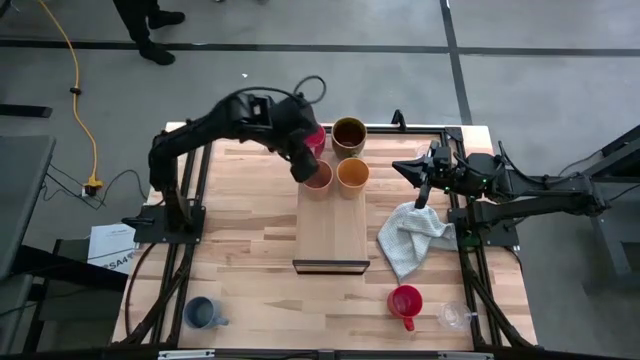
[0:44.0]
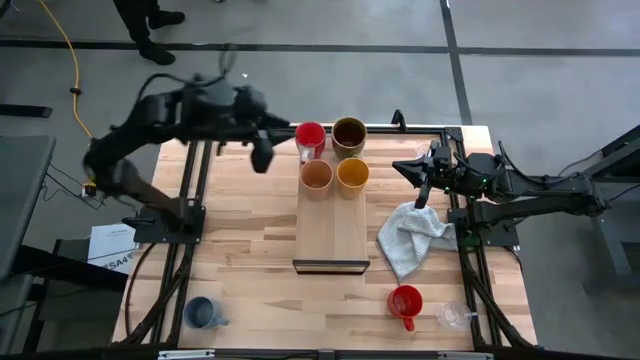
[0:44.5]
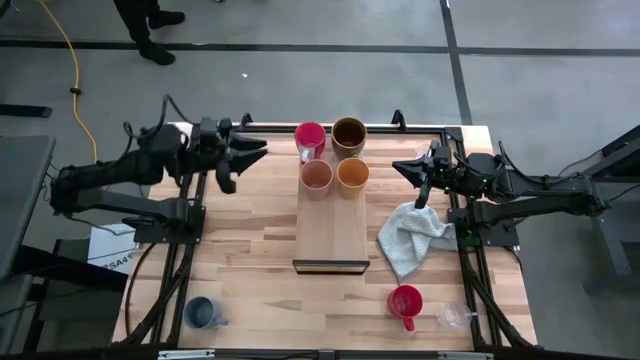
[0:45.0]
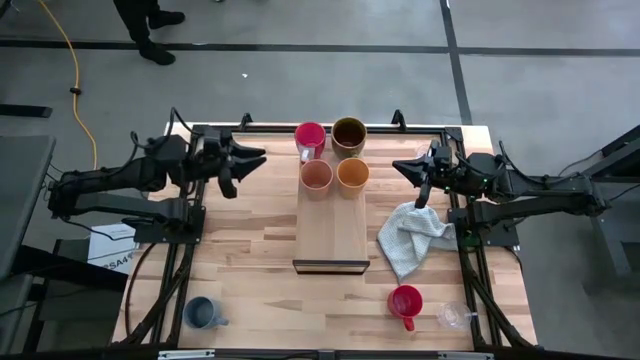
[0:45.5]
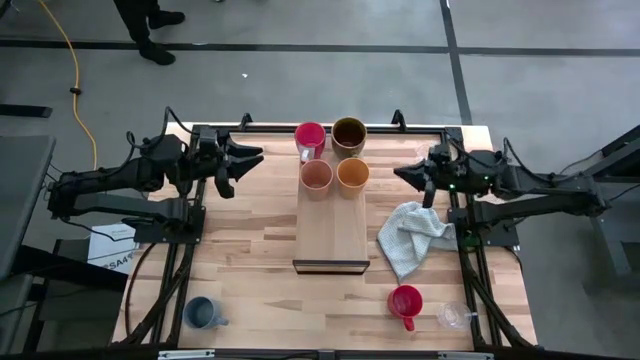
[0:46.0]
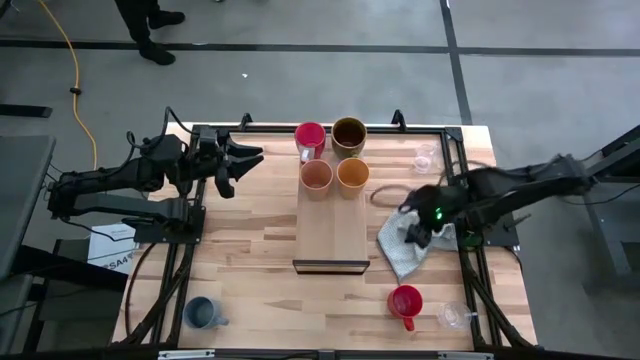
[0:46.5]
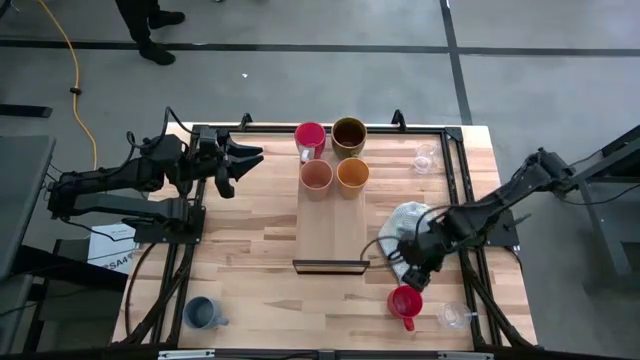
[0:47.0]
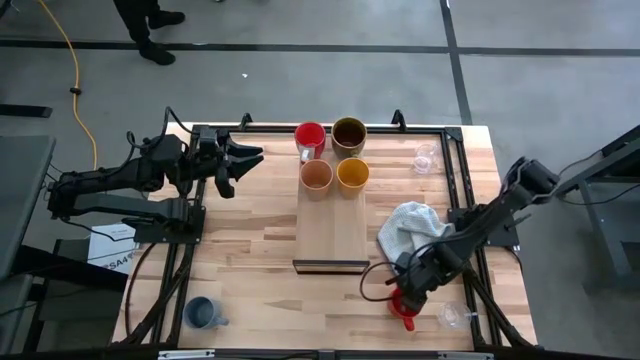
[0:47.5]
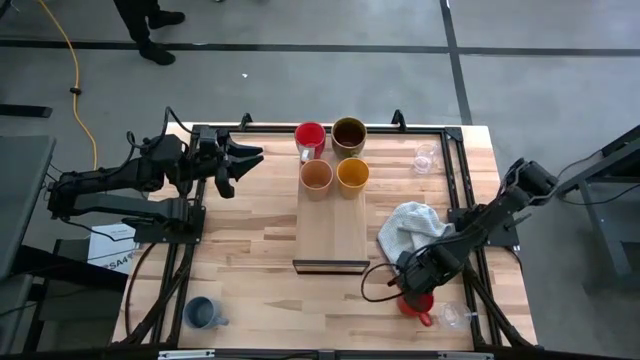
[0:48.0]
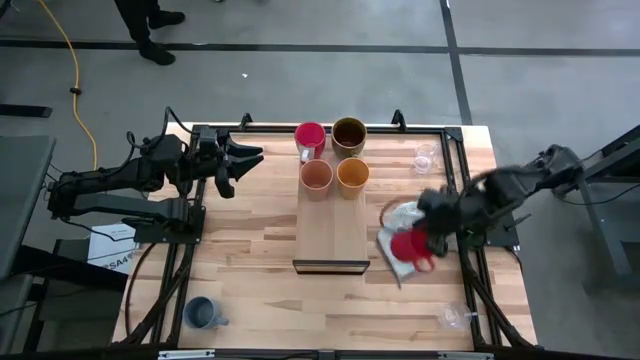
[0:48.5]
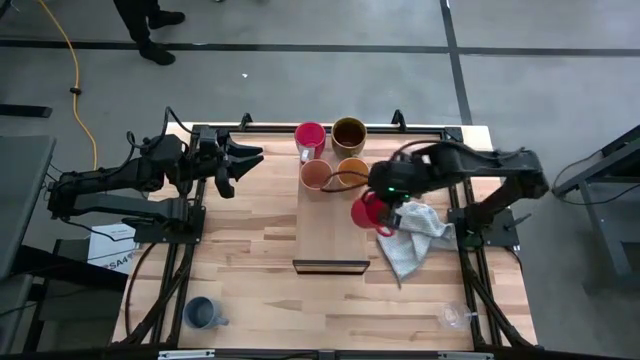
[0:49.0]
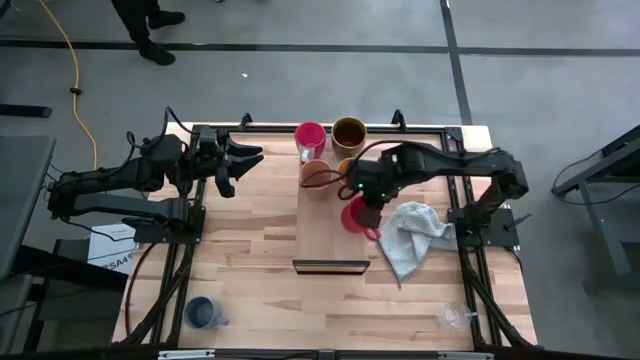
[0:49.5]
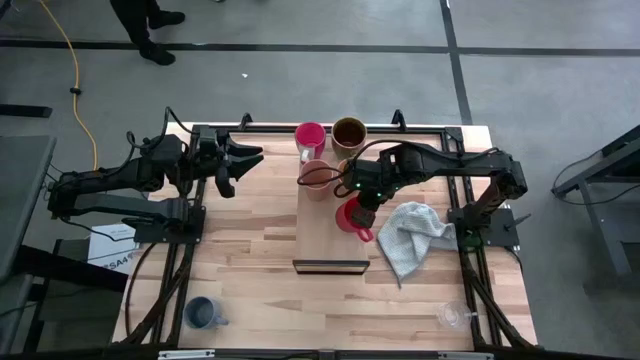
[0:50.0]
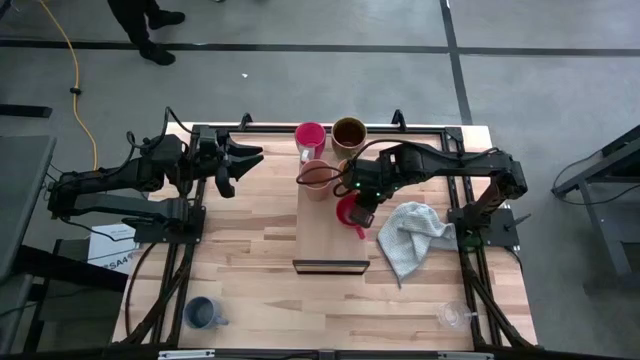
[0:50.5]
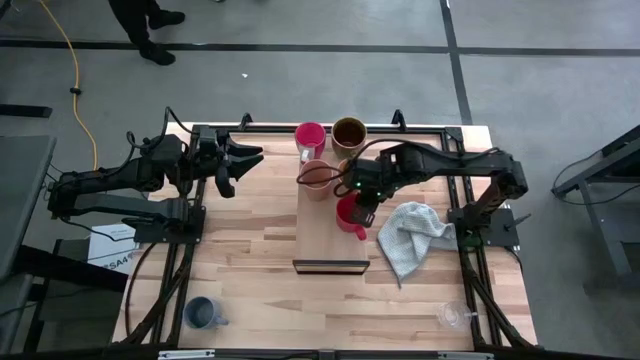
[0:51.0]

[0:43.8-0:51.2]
Task: Stack small to large cups/mugs on shelf
Put the red mug on the shelf

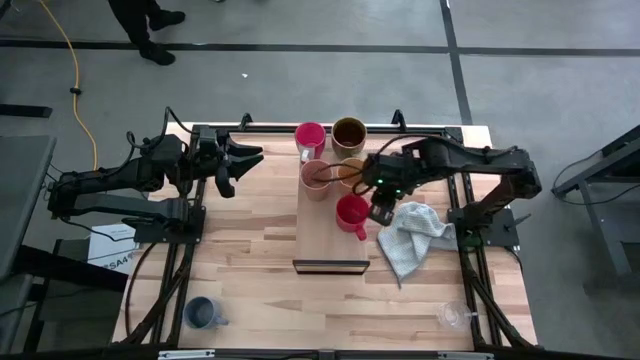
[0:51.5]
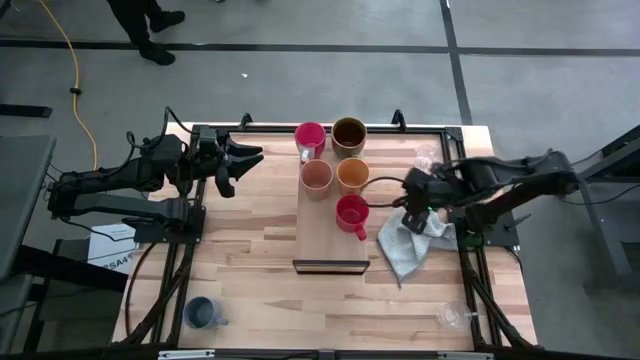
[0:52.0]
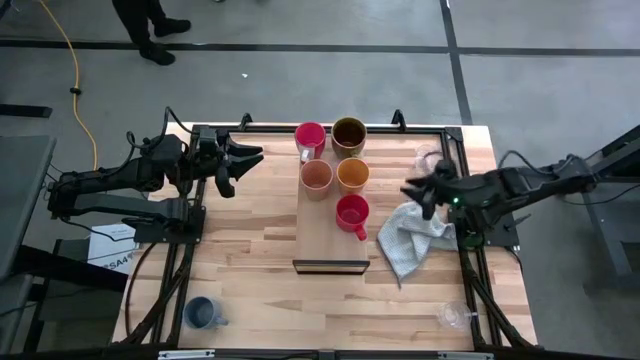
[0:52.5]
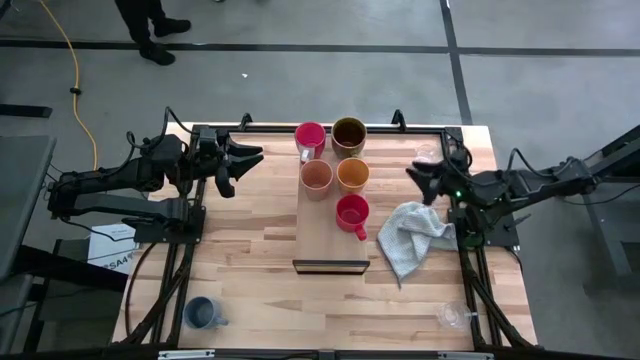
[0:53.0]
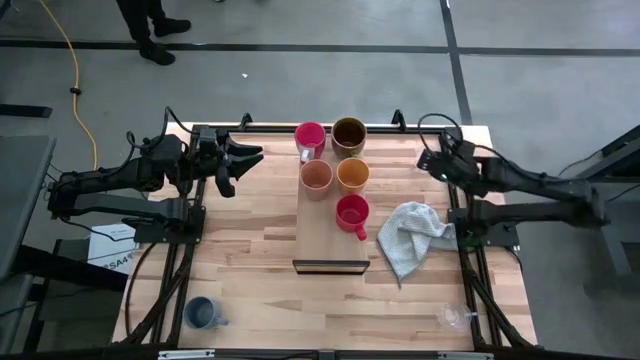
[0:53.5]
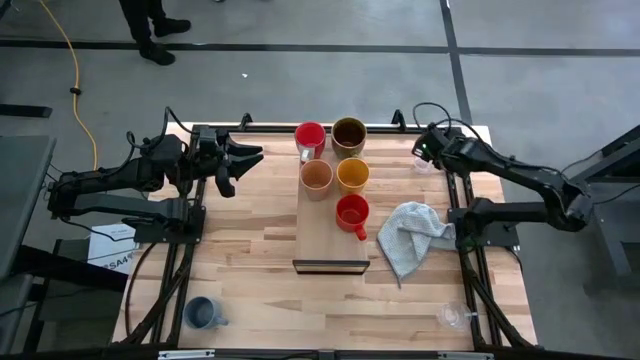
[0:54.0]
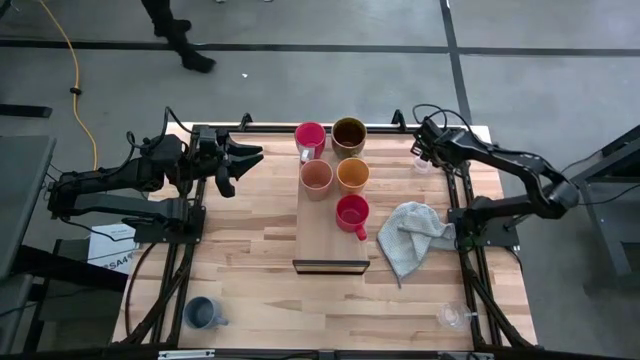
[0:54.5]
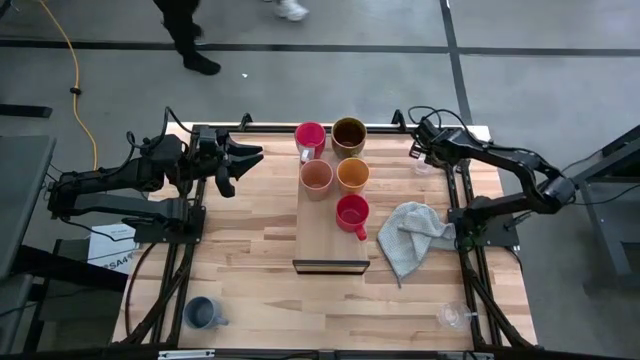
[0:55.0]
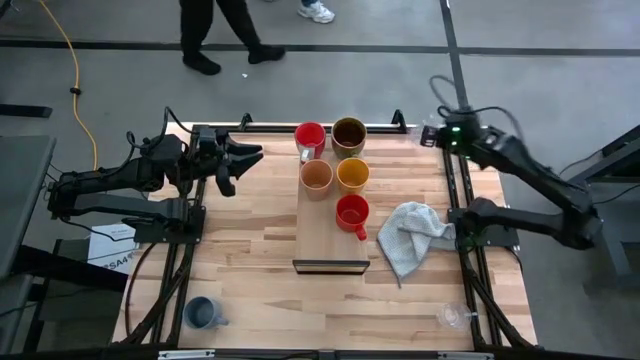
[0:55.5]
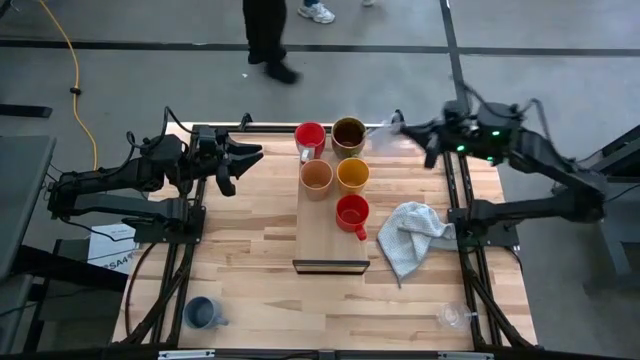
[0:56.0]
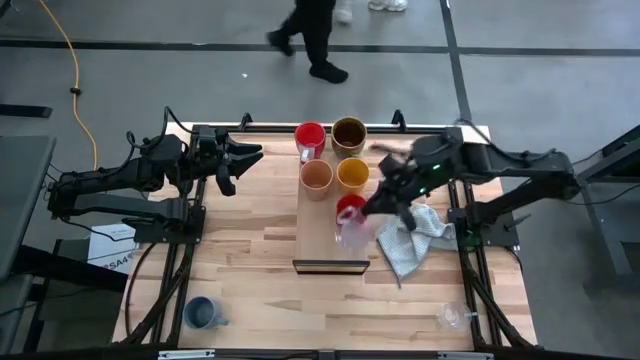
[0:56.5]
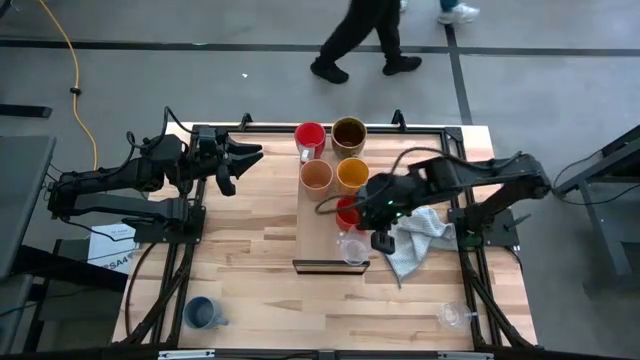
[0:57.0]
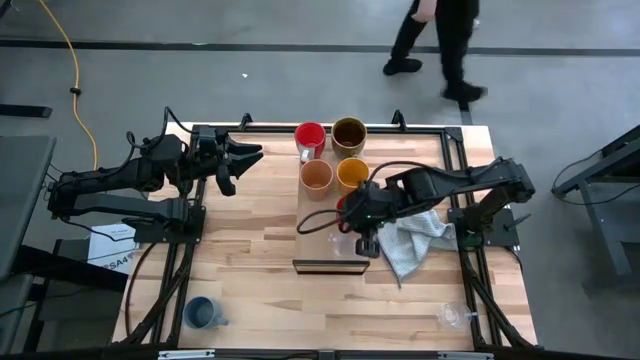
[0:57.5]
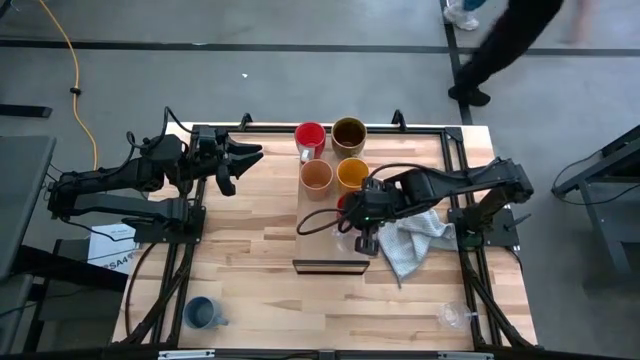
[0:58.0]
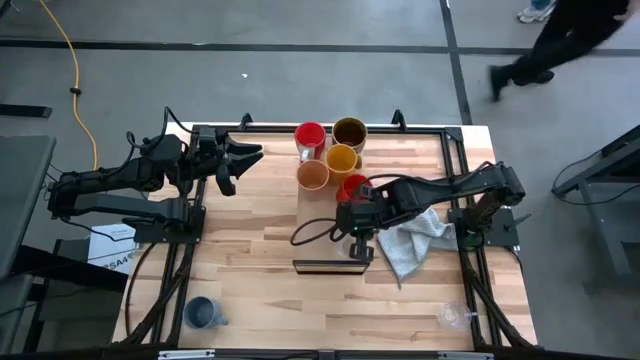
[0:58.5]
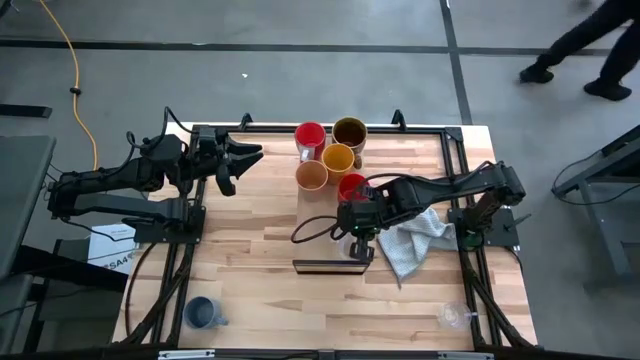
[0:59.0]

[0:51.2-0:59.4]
Put the top transparent mug on the shelf

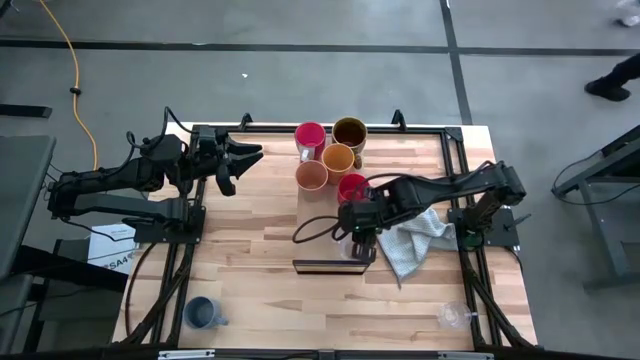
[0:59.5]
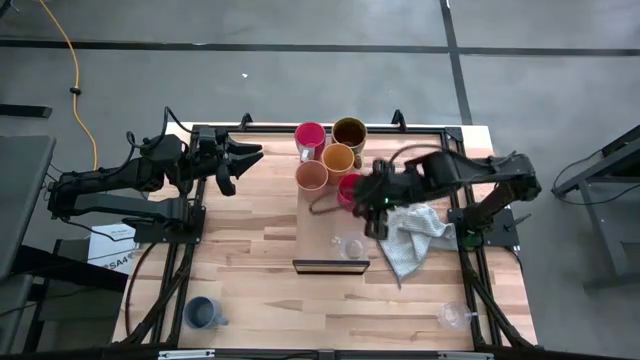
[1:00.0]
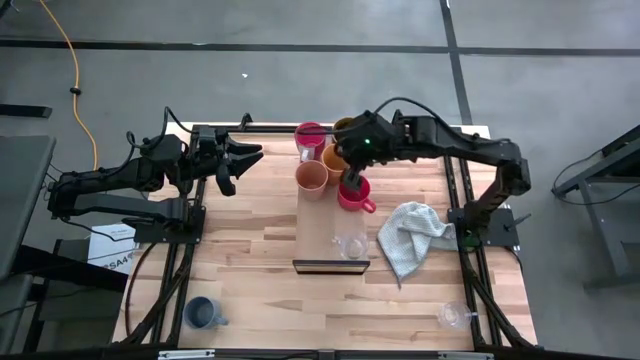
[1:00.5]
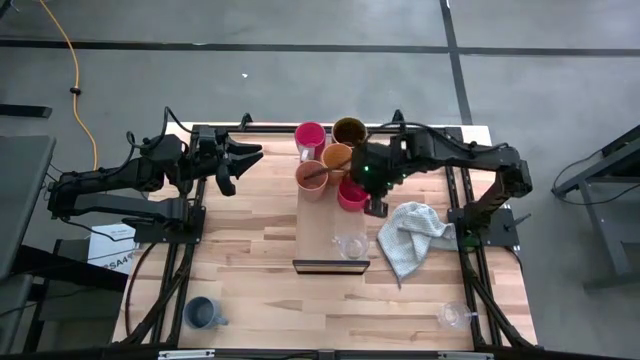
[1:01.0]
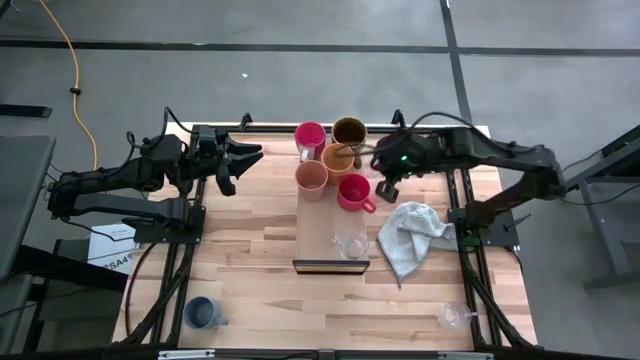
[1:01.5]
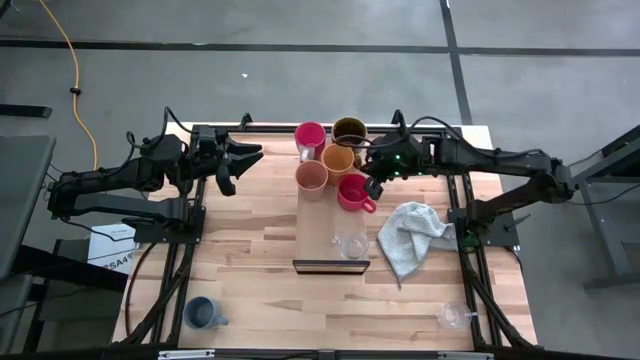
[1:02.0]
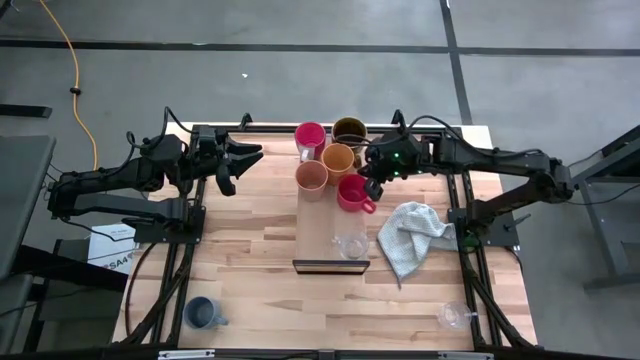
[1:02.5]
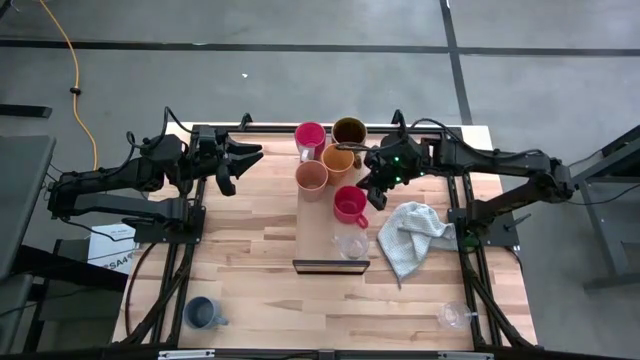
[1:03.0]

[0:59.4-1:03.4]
Adjust the red mug on the shelf

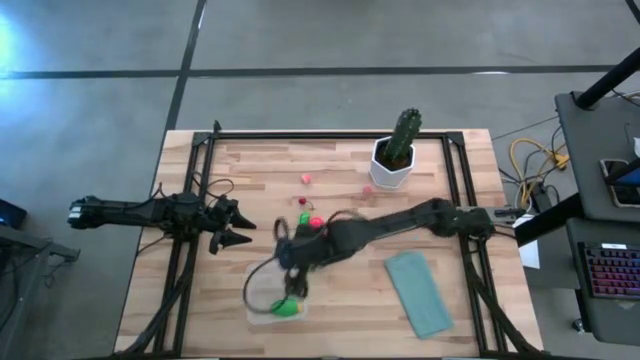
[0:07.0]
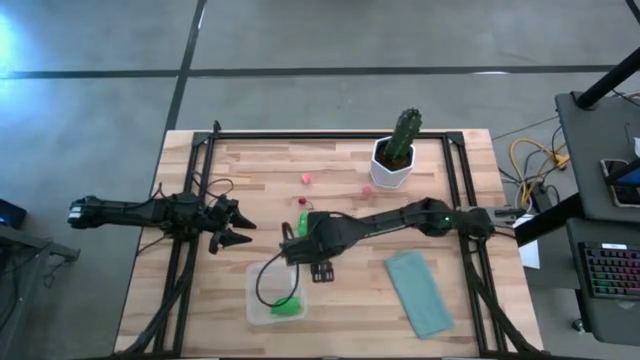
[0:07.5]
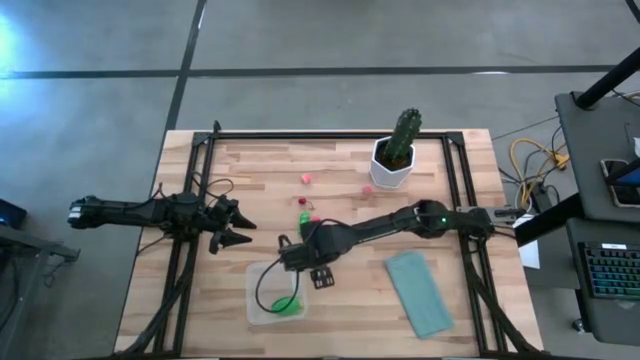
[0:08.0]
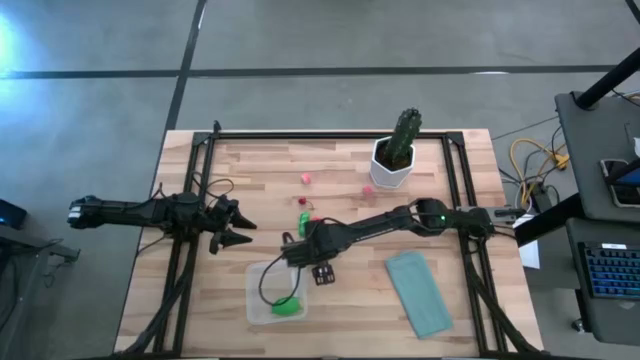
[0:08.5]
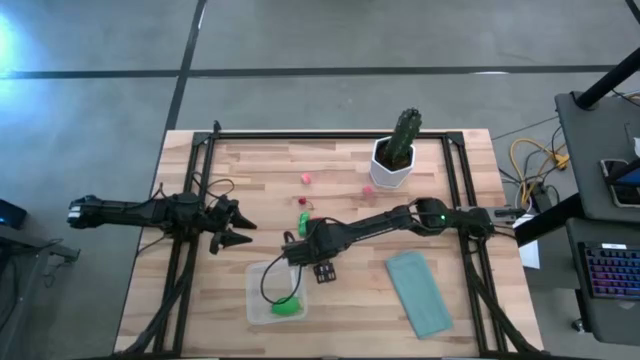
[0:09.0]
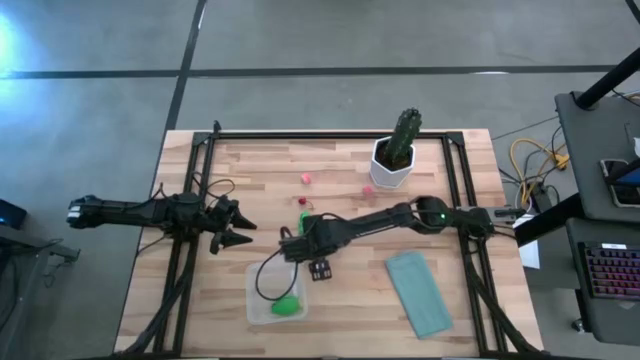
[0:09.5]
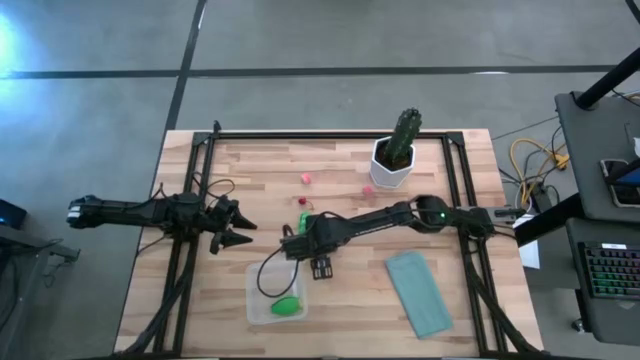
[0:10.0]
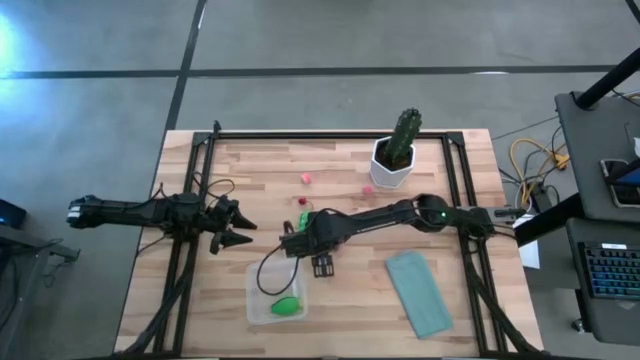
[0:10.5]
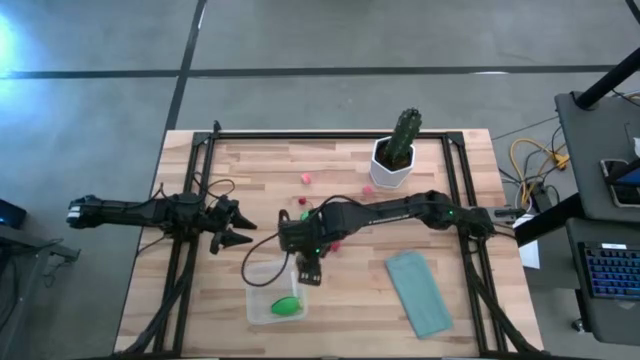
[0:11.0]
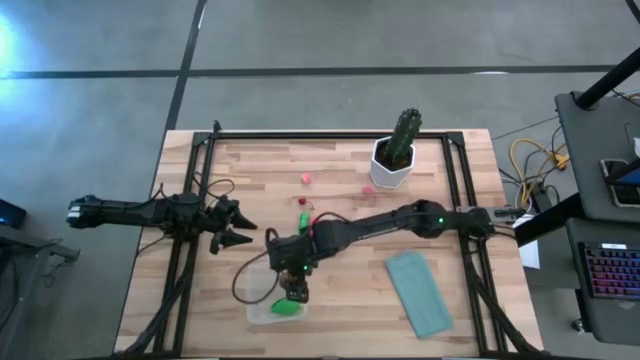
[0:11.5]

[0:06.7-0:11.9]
Task: Pick and placing Produce into tupperware
Put the brown kiwi into the transparent bin
